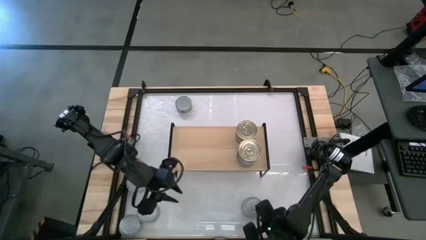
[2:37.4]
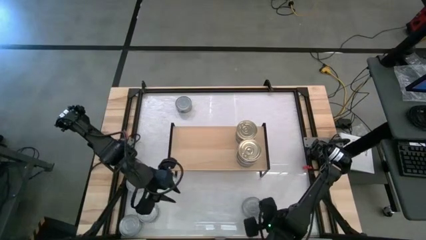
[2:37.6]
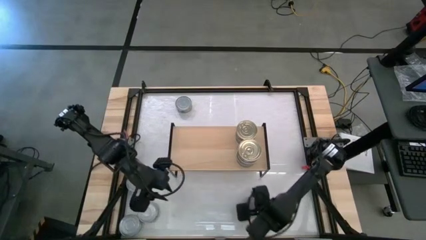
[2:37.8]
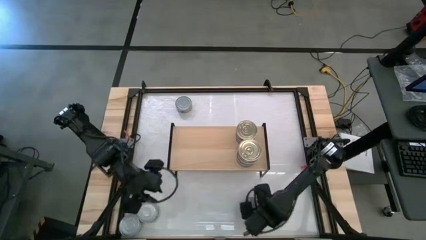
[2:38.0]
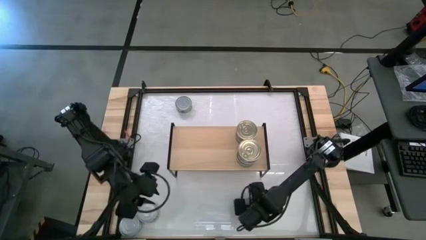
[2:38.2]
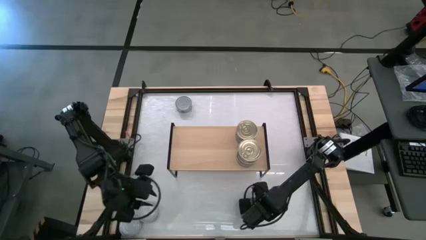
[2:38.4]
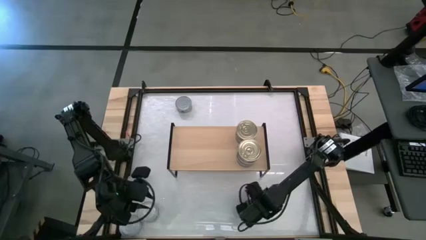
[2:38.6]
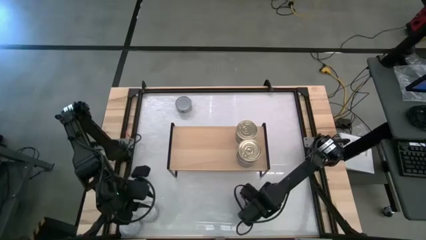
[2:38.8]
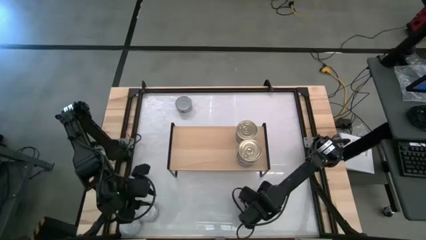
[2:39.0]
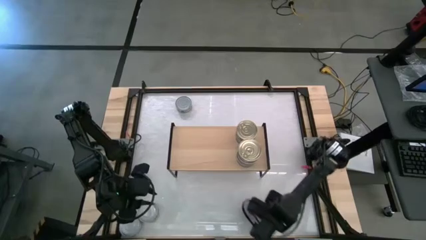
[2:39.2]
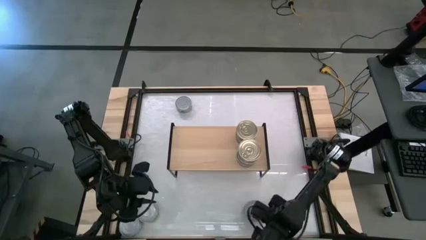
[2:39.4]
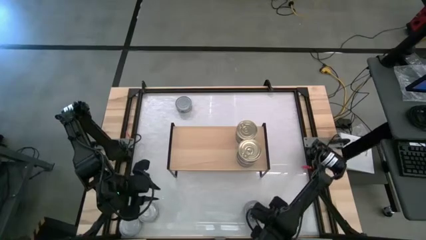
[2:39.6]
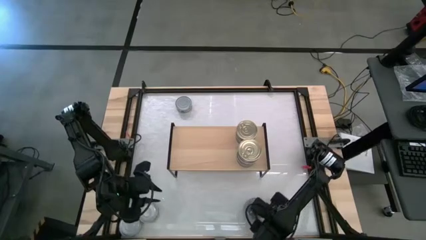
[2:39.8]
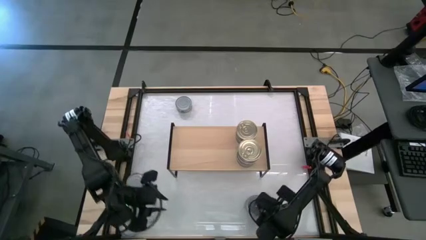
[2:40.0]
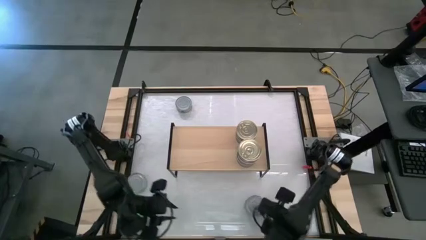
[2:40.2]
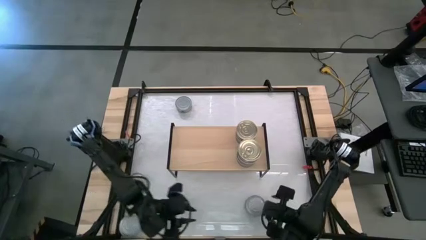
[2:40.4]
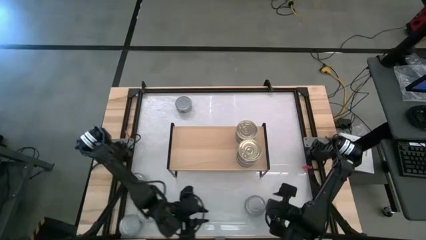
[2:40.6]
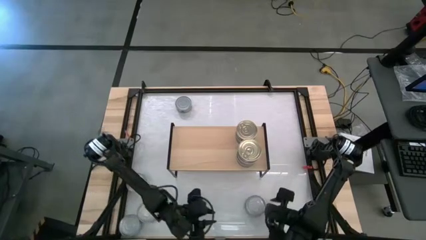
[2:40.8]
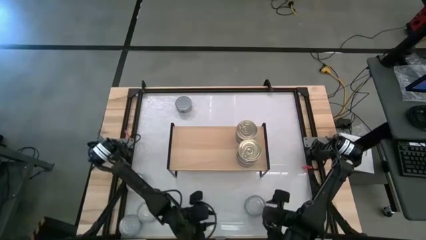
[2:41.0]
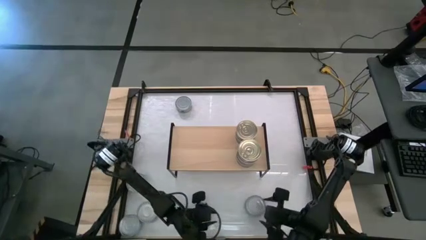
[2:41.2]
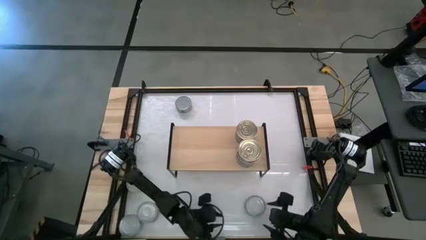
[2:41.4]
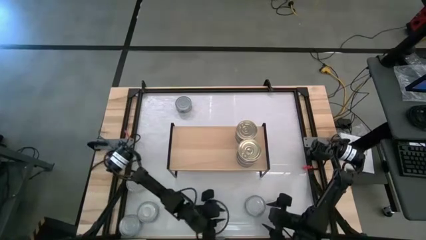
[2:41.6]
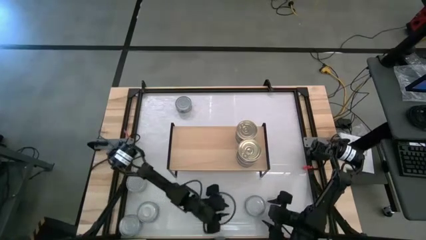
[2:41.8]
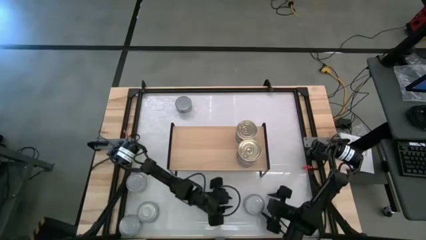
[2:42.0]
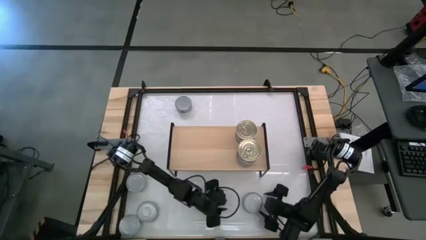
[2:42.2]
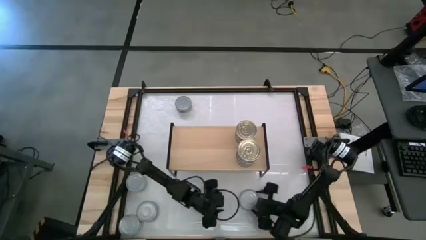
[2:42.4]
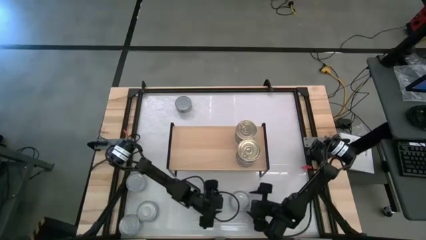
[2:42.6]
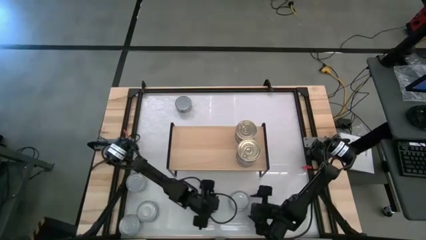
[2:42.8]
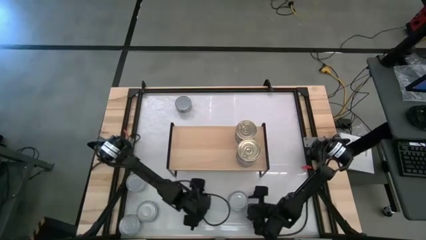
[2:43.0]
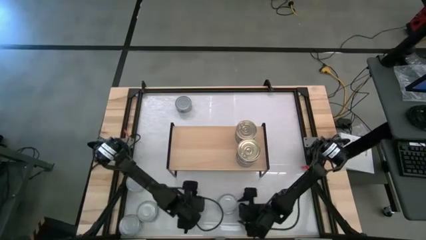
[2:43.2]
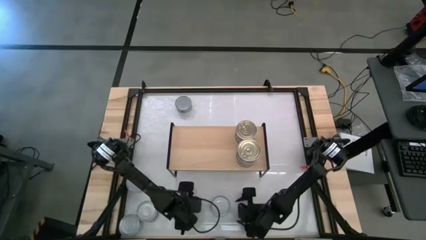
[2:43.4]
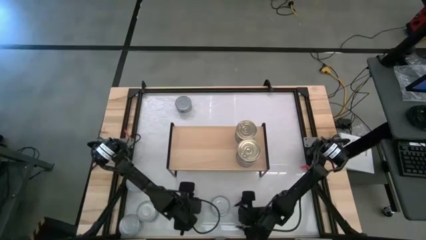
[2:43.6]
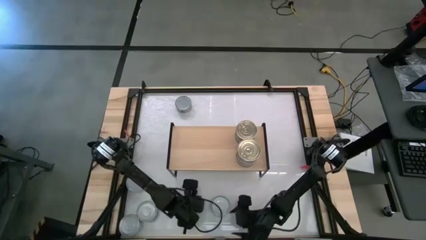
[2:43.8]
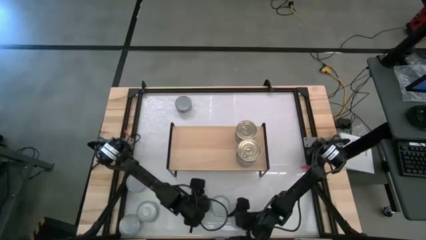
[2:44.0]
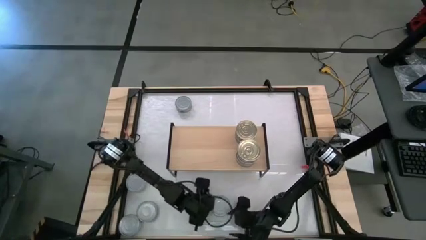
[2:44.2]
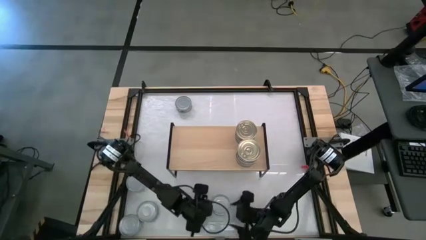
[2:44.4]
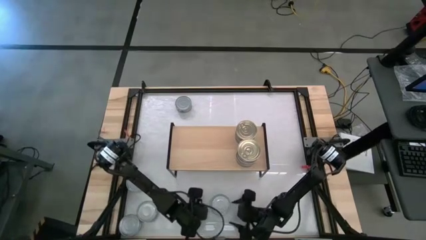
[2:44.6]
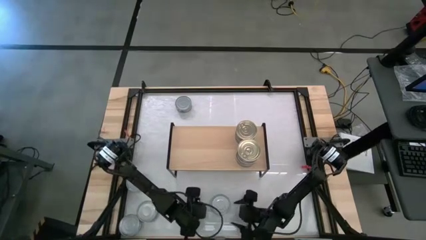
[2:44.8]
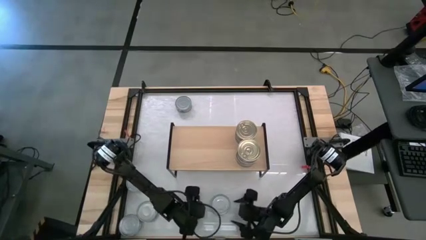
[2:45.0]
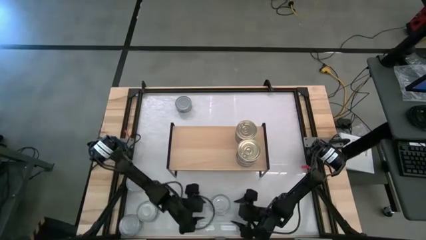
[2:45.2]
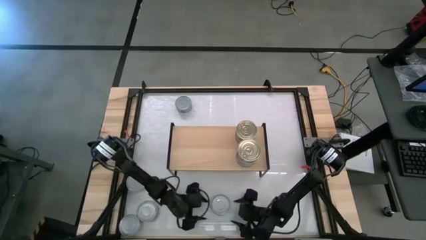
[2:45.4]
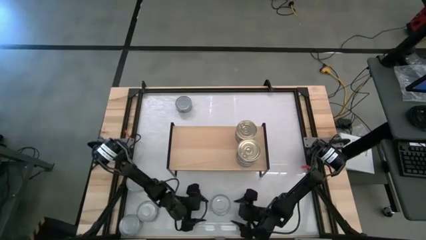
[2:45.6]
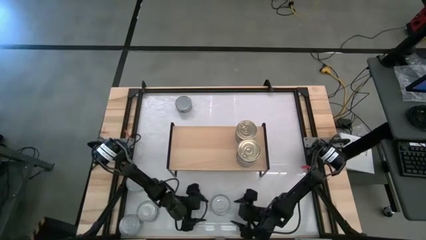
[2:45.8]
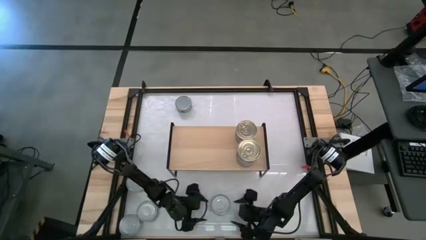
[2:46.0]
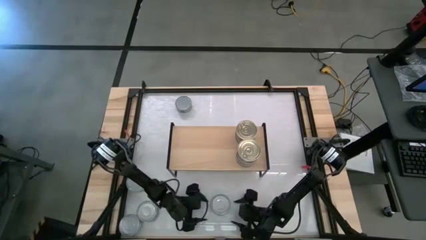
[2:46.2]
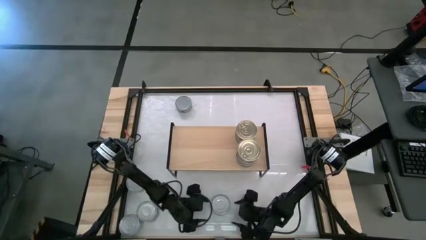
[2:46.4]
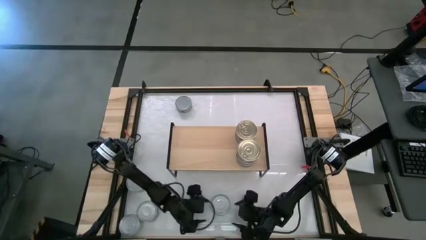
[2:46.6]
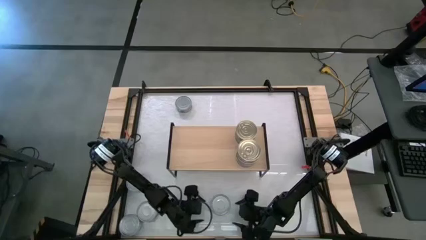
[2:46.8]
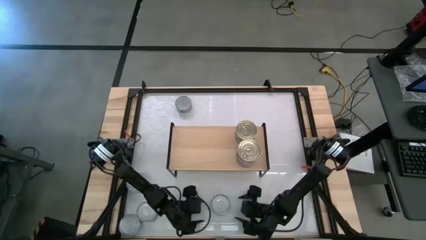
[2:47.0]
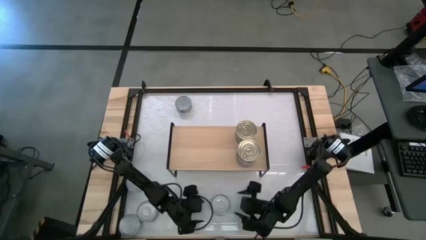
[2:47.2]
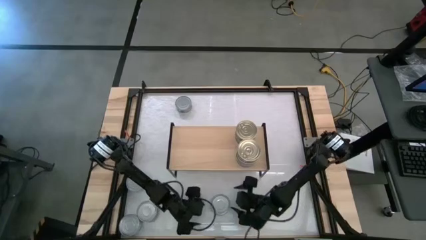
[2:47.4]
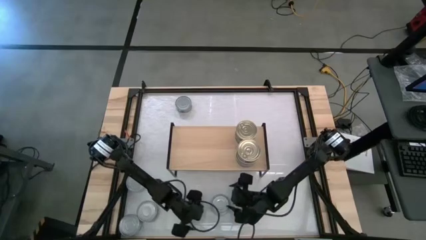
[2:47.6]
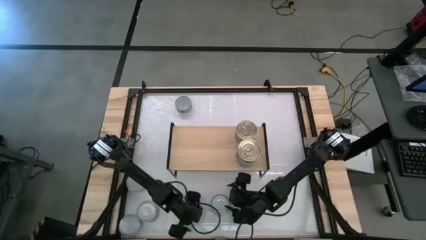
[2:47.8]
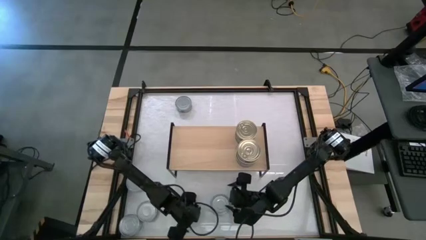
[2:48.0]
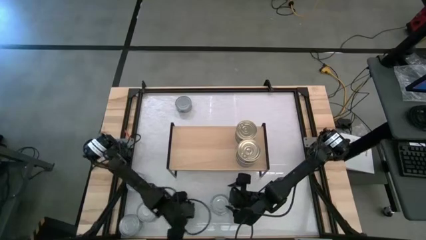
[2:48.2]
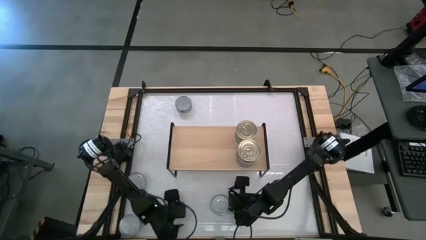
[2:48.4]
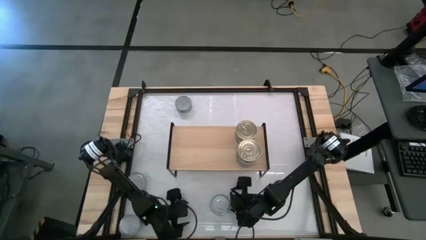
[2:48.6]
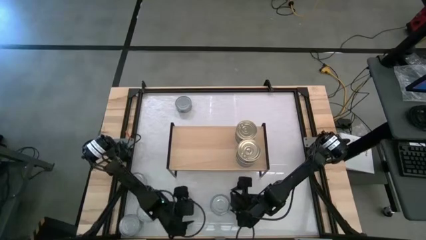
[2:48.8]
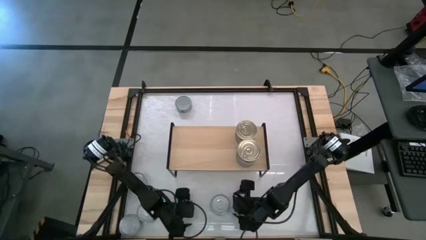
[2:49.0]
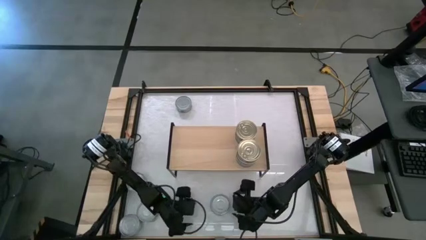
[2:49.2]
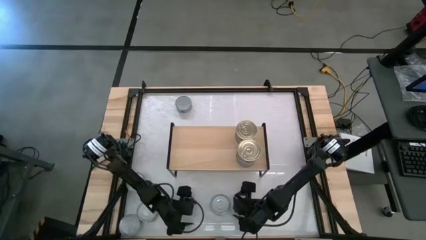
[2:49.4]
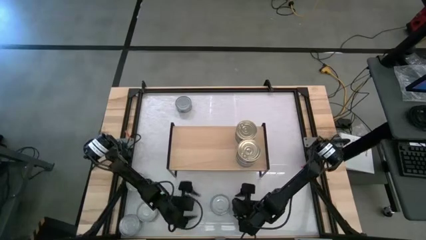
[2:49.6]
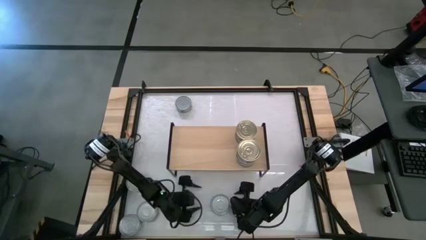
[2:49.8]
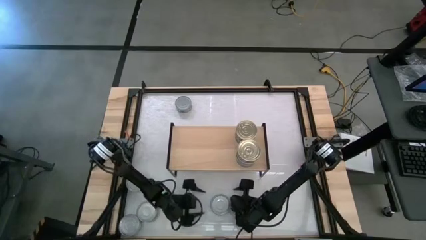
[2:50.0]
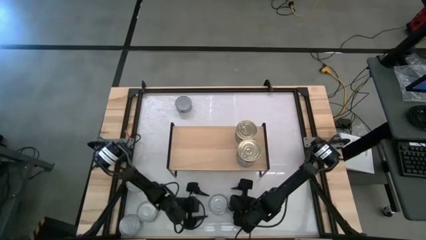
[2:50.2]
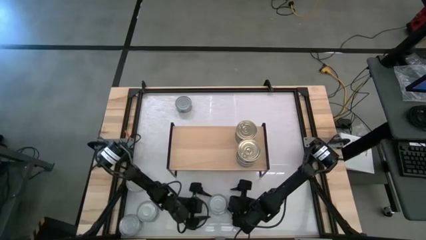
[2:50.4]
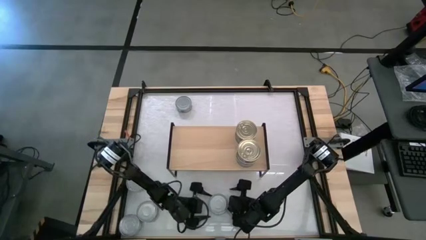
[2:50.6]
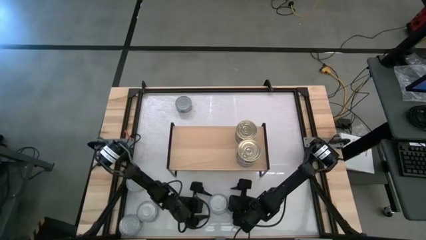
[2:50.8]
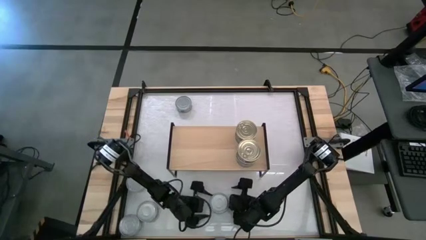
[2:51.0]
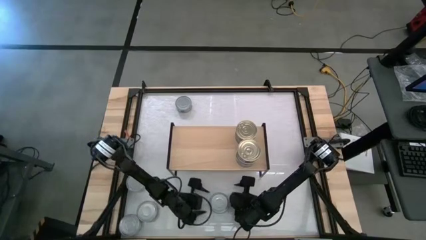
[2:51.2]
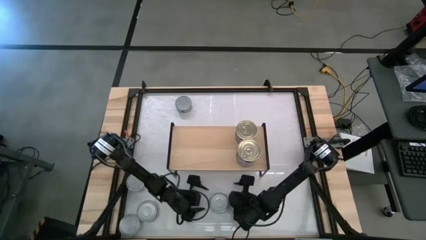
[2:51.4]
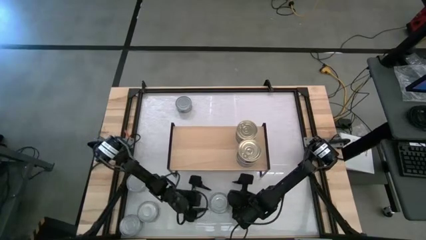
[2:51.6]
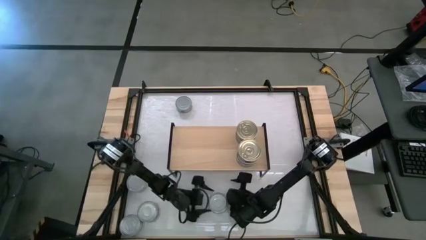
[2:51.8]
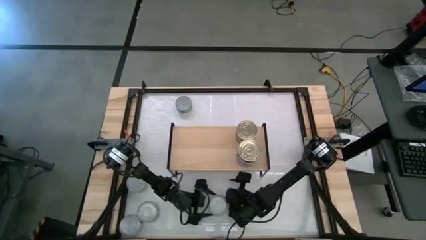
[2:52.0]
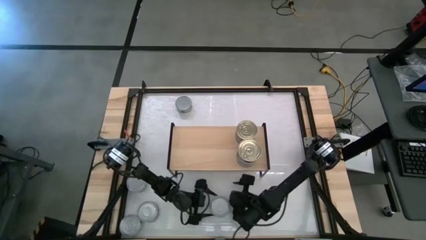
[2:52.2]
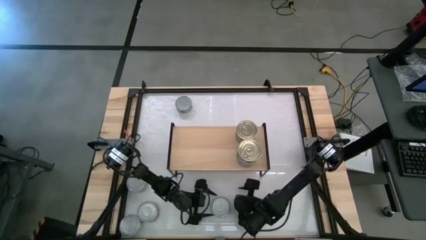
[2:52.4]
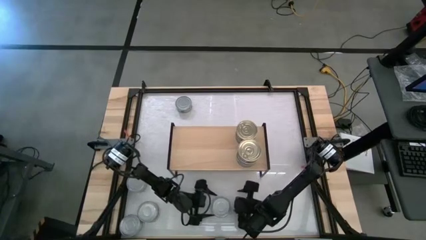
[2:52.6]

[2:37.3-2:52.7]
Task: Stack canned seafood by type on shelf
Put the green tuna can on the shelf
